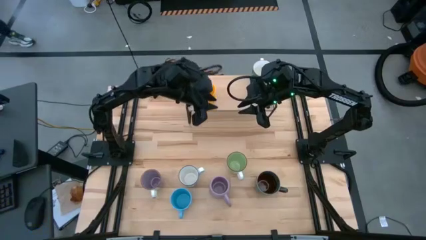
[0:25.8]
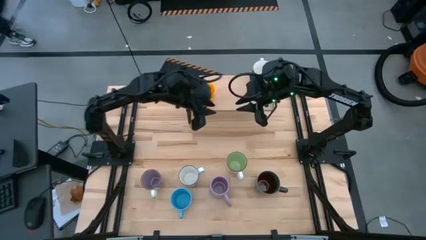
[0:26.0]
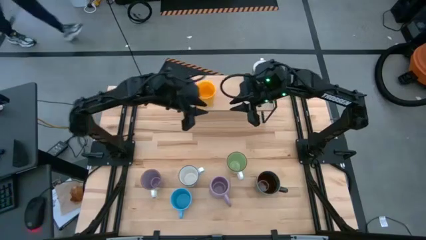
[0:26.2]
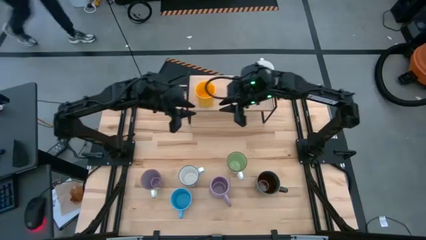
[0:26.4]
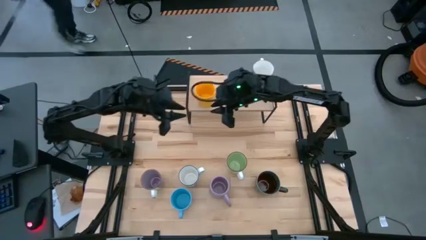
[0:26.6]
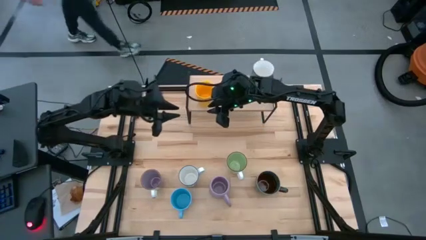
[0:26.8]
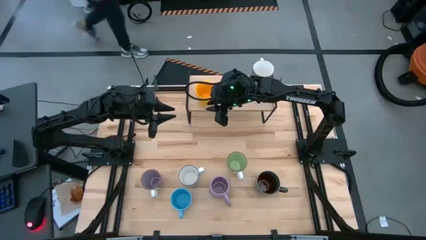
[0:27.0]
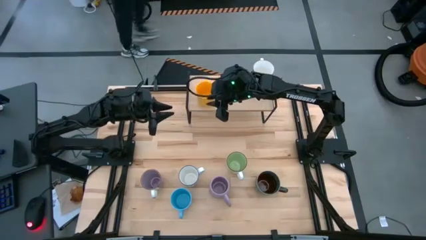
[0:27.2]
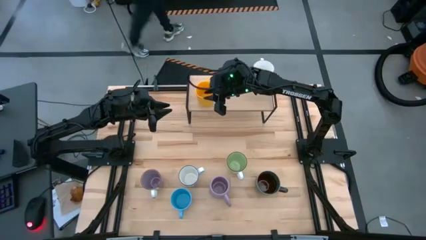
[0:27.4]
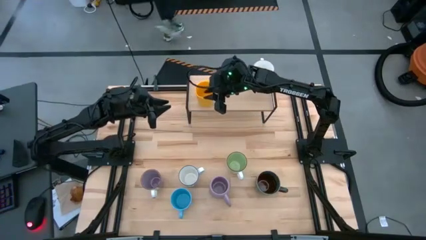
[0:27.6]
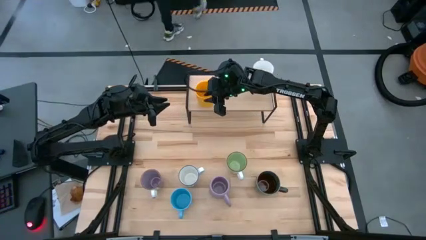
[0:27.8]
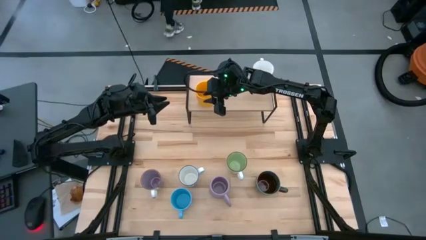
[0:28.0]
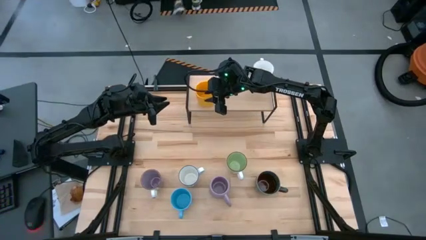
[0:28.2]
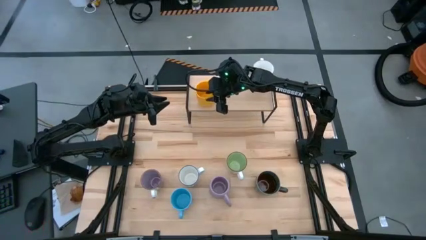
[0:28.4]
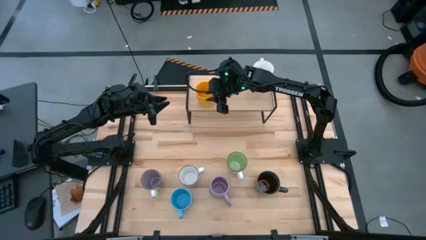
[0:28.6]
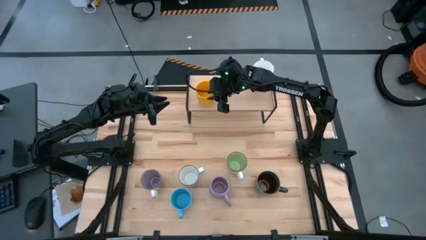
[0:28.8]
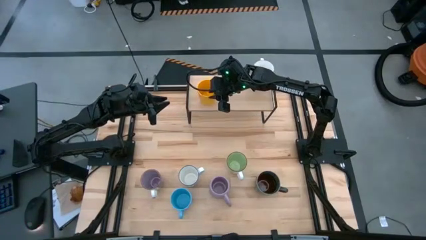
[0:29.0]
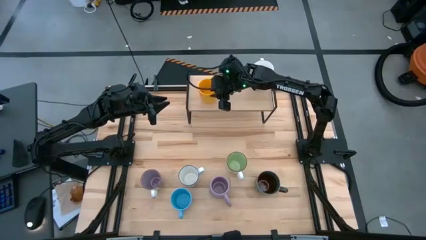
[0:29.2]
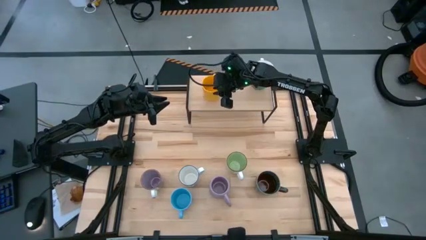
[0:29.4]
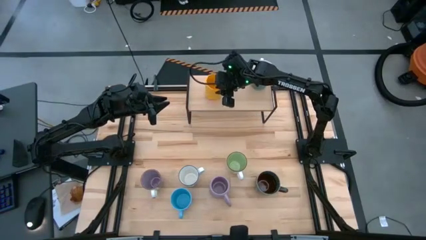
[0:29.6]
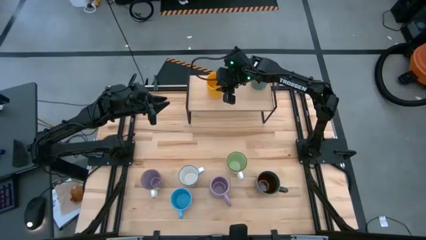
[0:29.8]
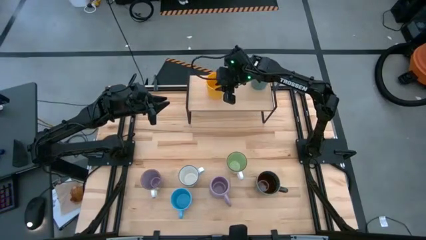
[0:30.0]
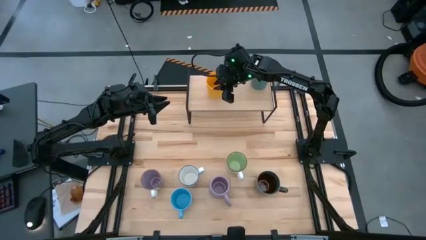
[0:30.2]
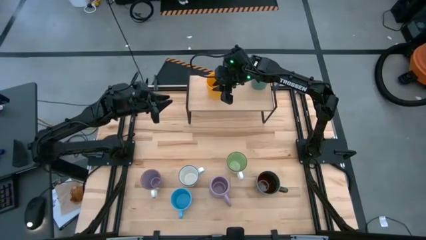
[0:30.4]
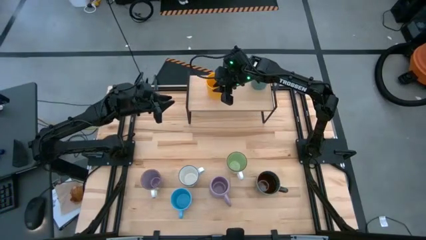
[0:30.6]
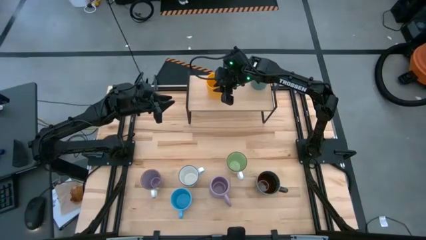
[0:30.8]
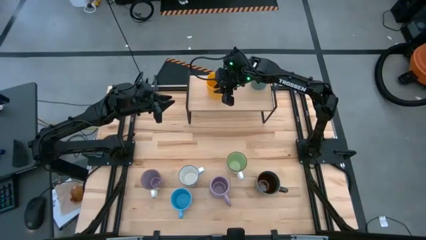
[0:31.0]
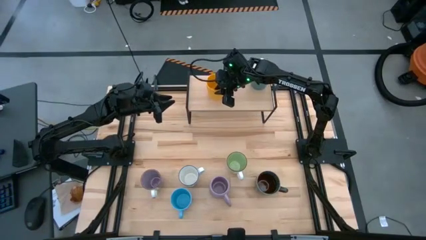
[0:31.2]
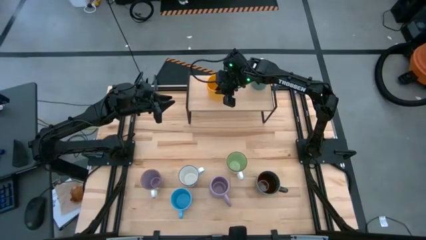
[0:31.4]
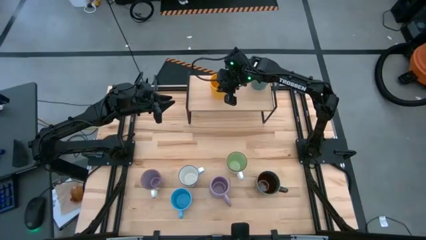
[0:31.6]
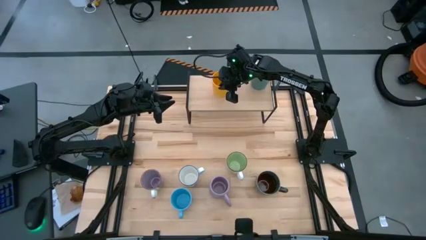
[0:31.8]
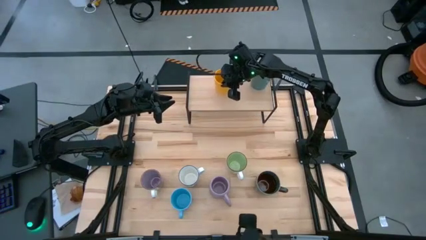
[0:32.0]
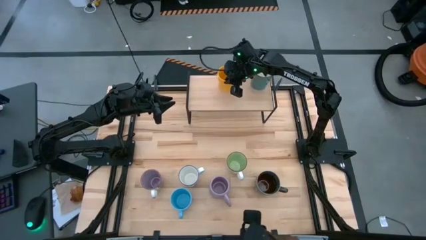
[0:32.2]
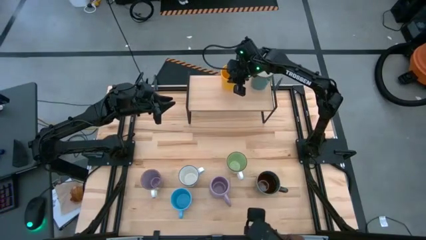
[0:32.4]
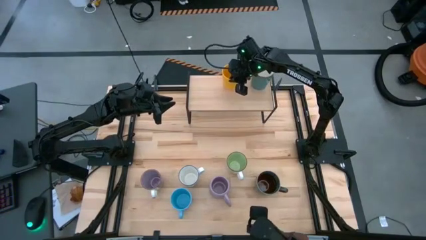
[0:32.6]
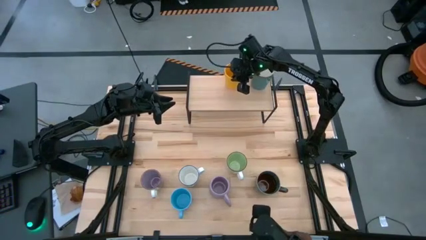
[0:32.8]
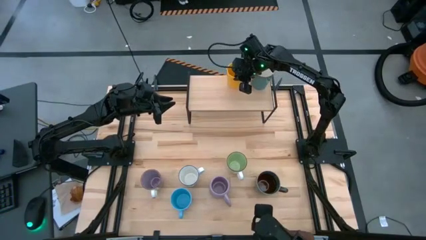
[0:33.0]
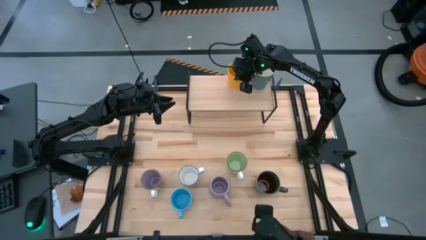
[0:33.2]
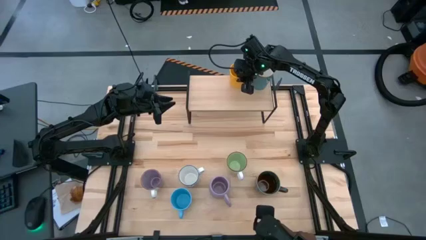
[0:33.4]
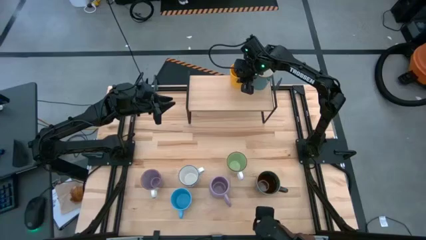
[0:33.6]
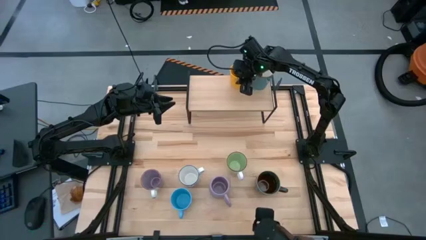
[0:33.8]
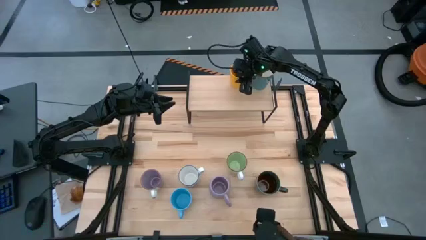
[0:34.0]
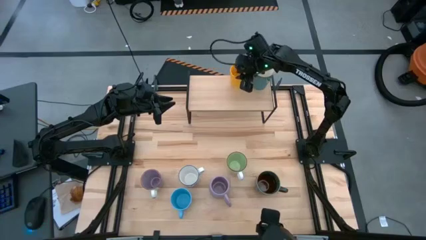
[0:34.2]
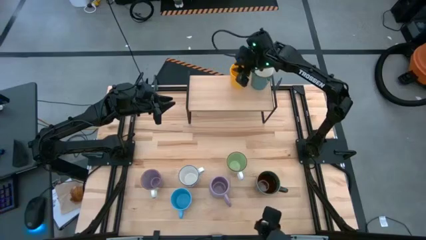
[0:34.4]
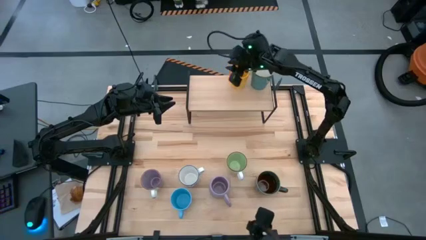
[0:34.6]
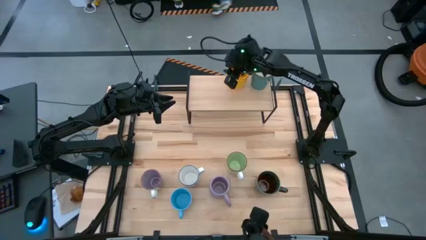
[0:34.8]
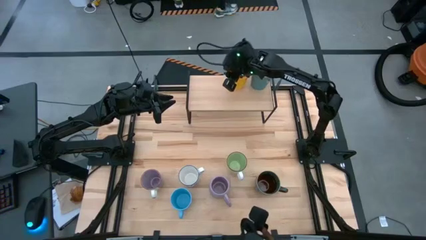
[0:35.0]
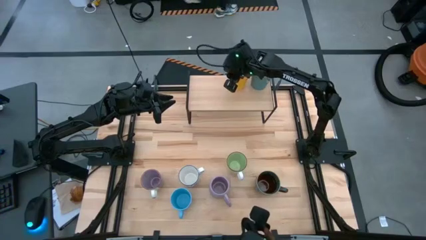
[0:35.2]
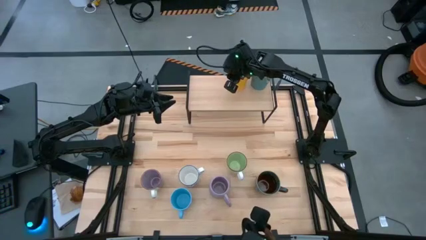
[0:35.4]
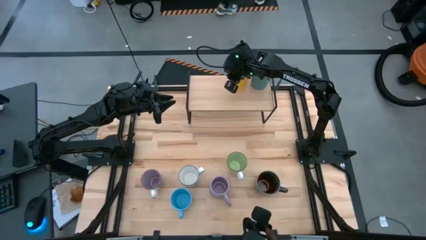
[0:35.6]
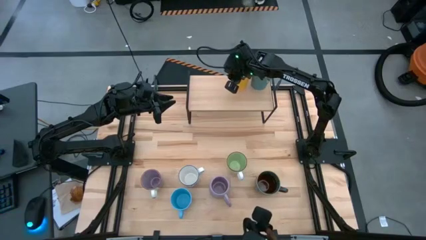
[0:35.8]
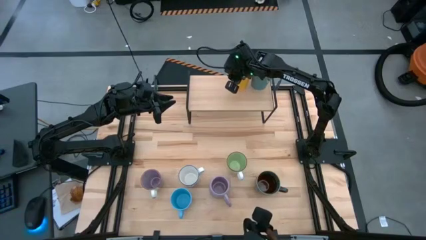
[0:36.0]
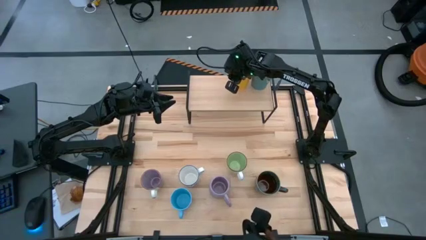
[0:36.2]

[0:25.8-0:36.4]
Task: Place coffee mugs
Put the yellow mug on the shelf

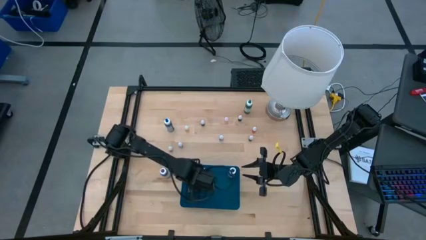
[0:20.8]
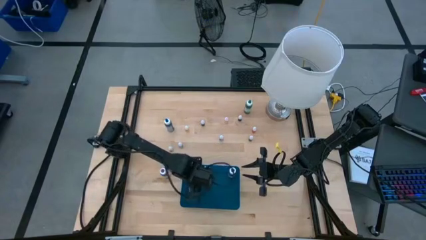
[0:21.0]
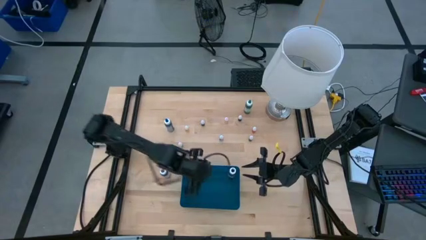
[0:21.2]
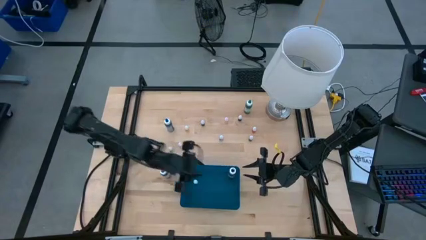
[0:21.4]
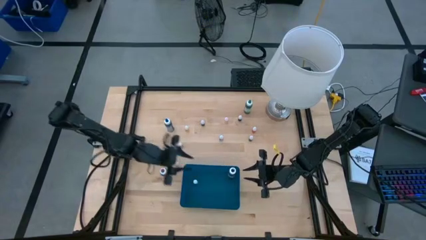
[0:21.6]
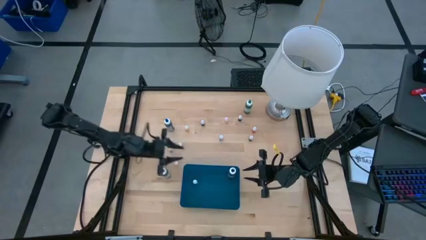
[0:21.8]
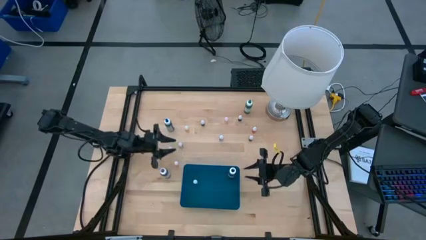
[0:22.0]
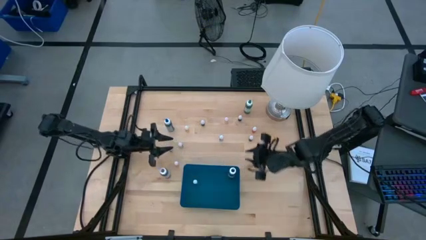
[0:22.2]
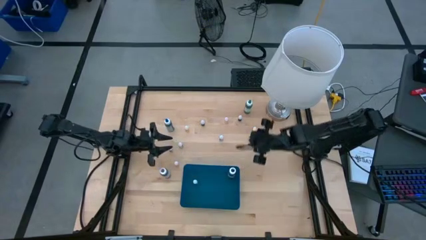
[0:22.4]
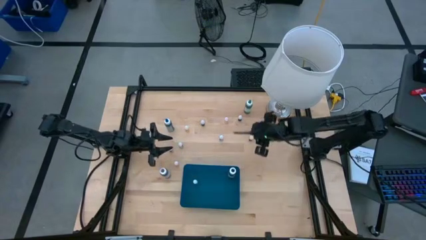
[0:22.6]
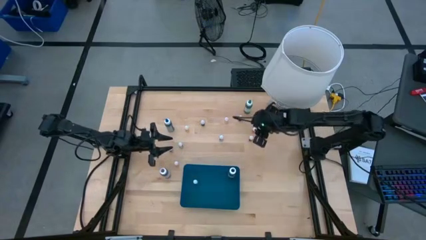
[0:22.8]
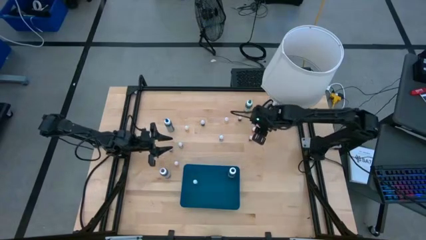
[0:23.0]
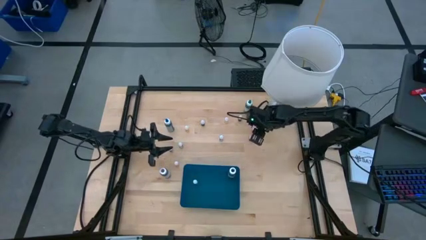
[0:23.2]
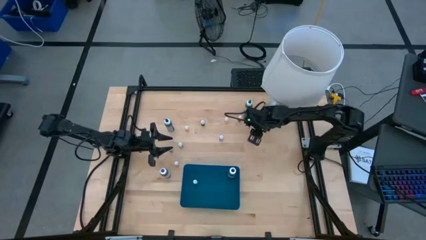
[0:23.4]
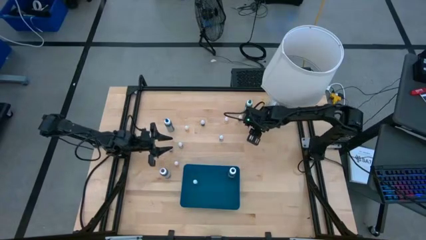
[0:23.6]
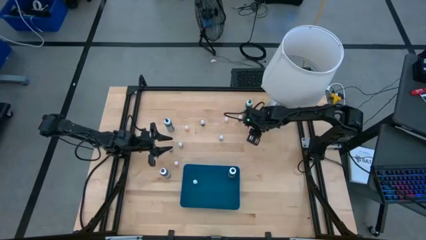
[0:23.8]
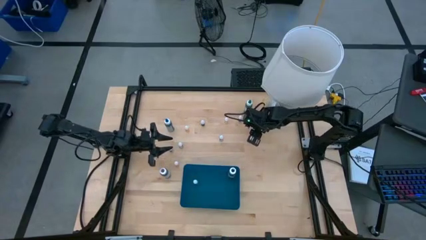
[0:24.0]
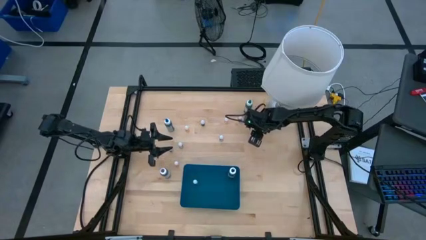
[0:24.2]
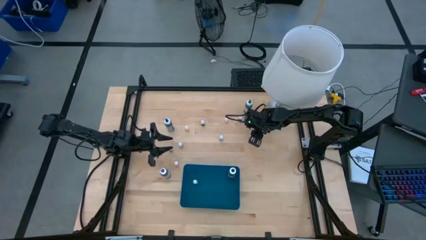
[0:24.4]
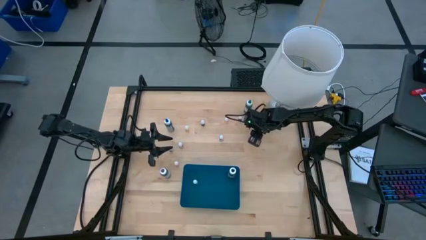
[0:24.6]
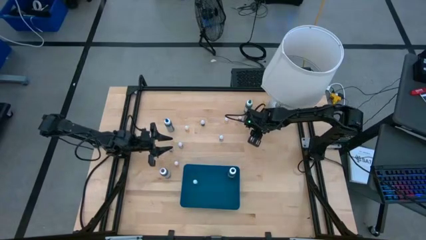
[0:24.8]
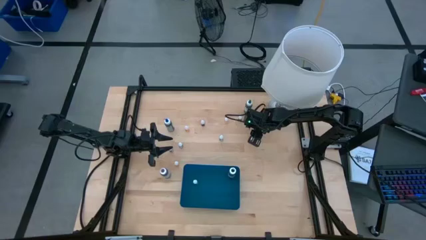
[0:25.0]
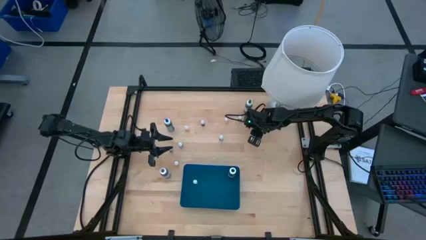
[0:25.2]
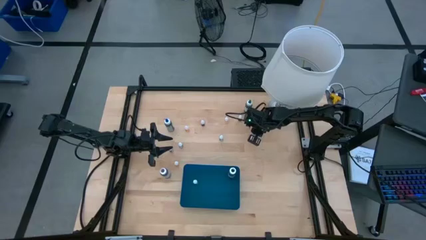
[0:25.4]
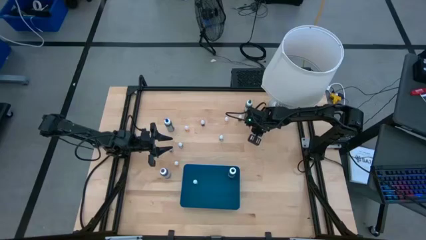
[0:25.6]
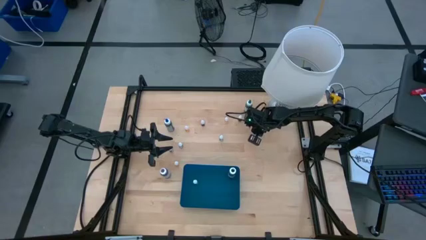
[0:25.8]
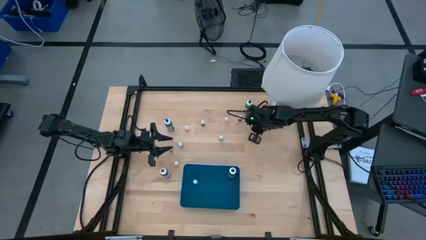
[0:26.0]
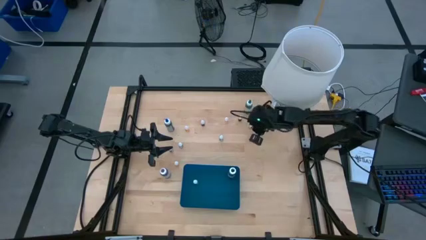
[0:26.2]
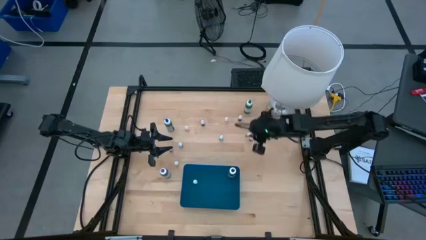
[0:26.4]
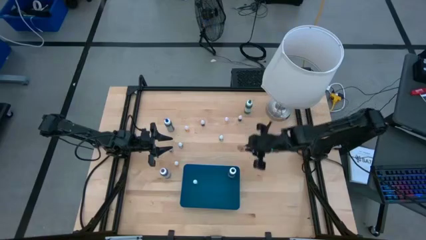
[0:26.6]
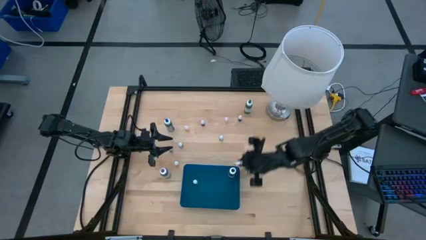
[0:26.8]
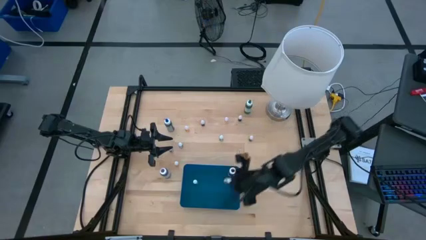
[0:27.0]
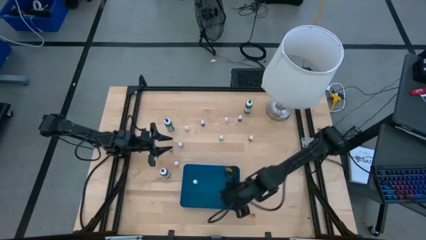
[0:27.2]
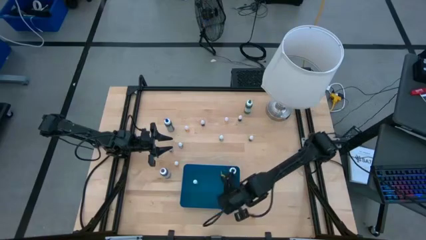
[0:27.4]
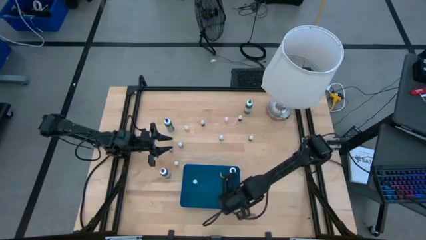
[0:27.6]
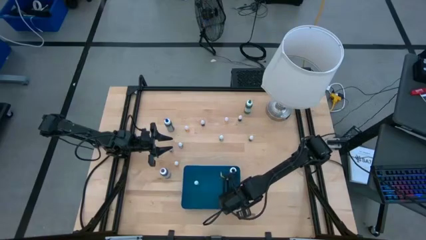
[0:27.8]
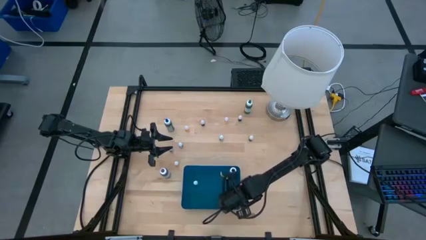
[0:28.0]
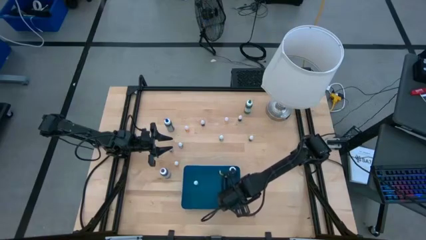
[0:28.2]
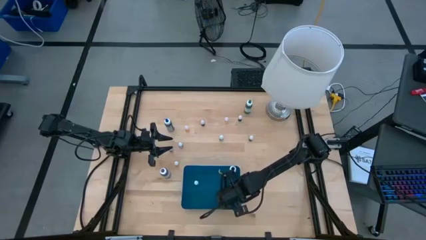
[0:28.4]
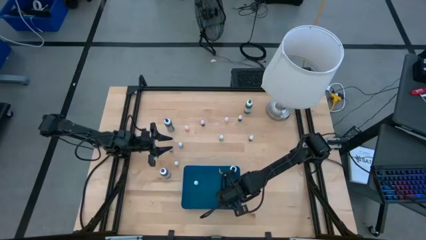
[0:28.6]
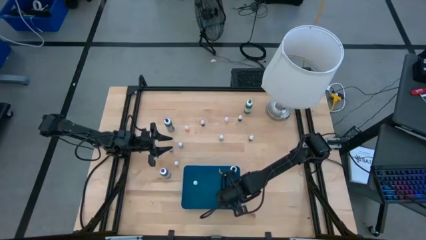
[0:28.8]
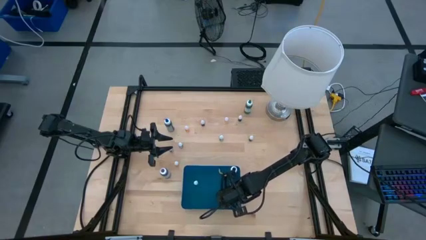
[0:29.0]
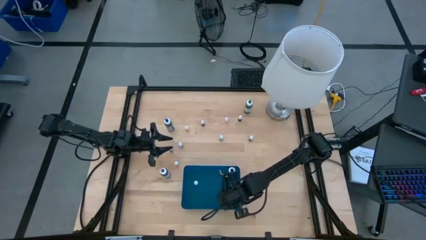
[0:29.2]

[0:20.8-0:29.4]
Task: Pick & Place food coloring
Put the orange food coloring bottle into the blue container
